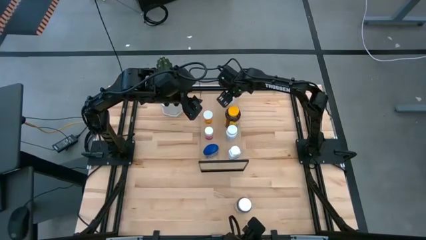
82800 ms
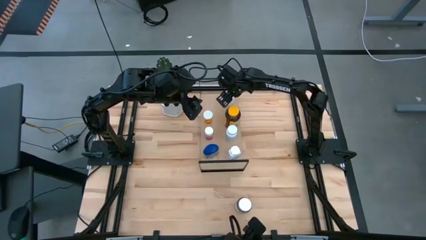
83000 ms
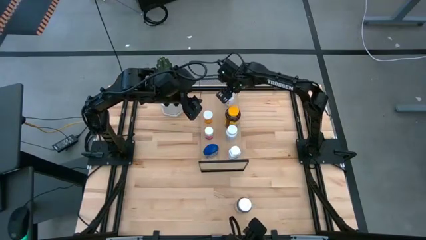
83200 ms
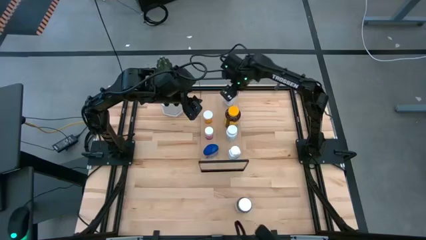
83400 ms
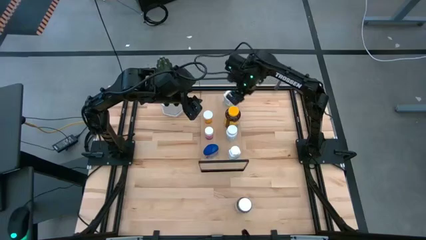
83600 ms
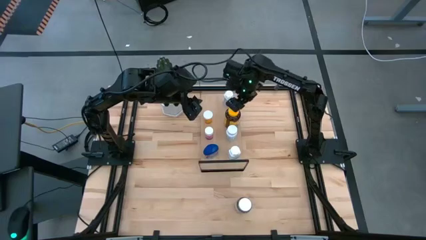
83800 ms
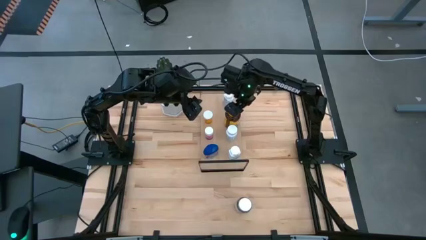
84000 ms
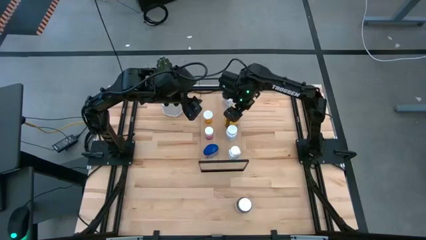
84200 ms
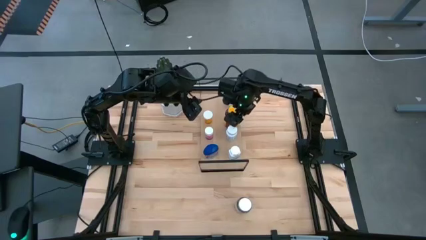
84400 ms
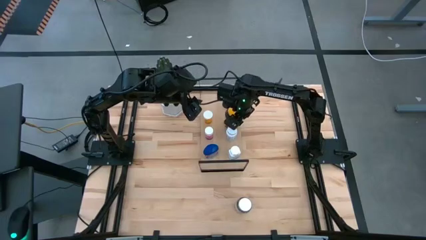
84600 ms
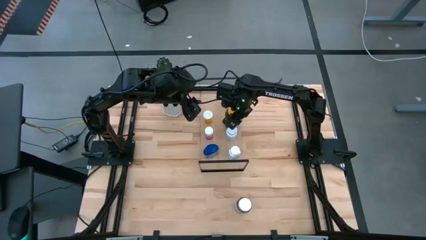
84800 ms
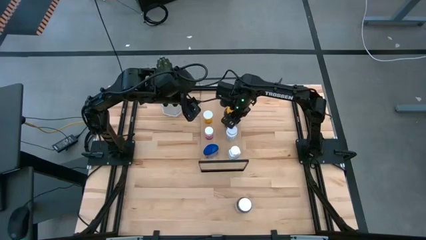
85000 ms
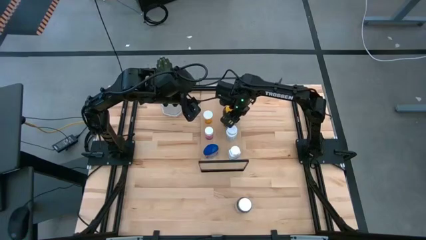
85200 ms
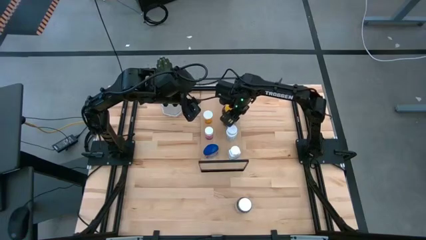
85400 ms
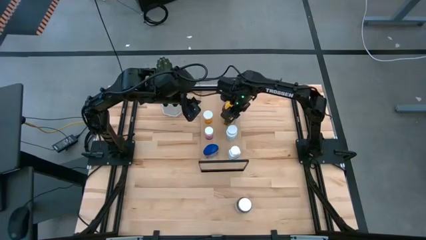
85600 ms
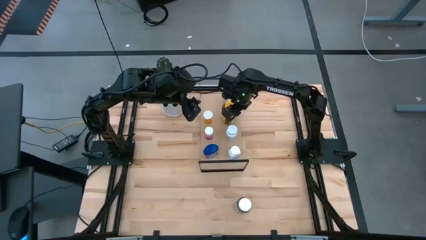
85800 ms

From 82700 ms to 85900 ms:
Task: Pick and place medicine bottles onto shelf by color
Adjust the large orange medicine bottle on the shelf

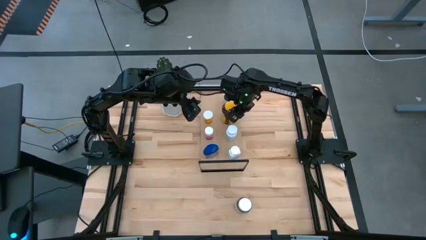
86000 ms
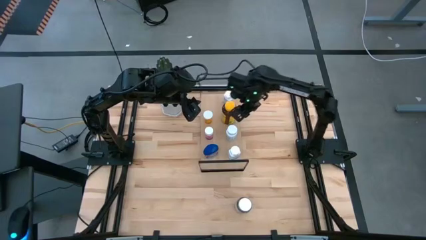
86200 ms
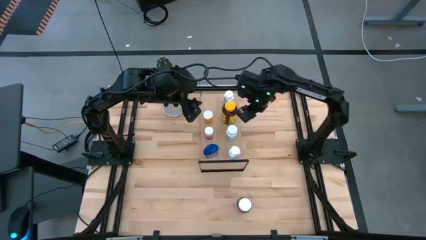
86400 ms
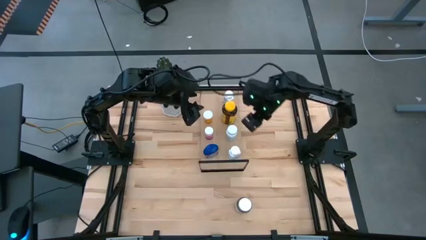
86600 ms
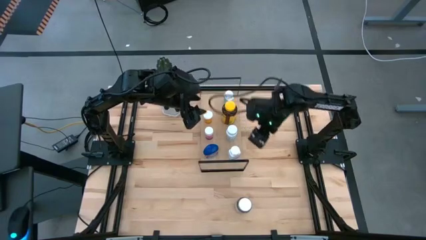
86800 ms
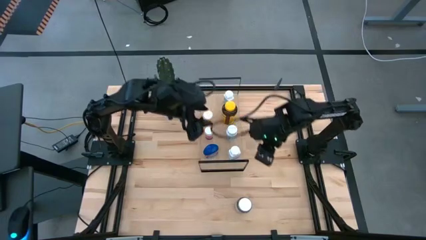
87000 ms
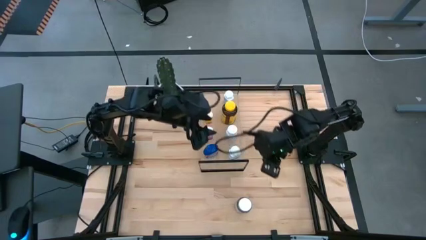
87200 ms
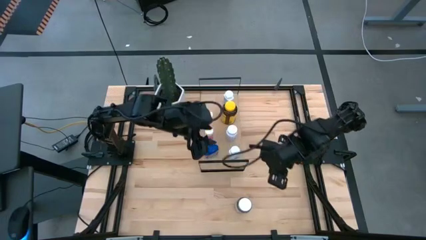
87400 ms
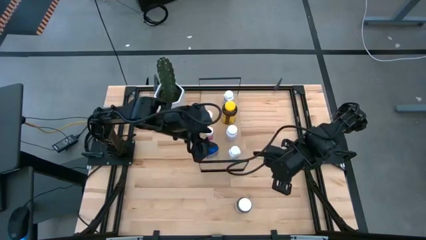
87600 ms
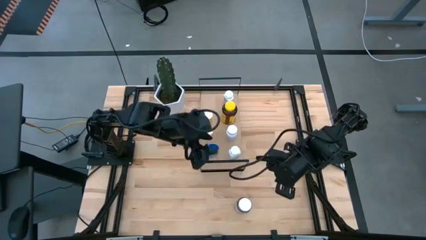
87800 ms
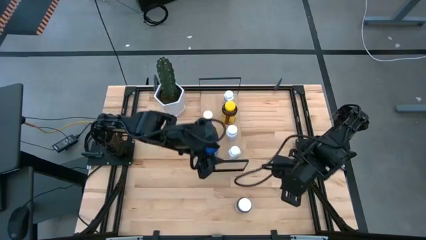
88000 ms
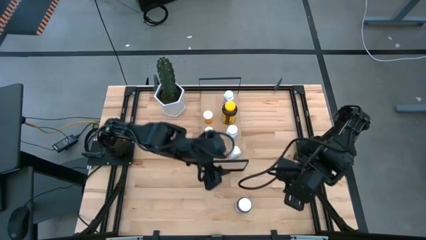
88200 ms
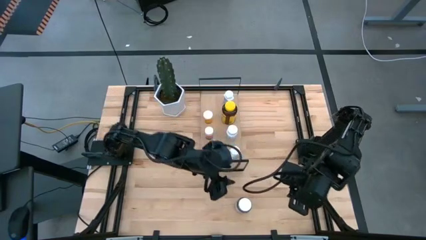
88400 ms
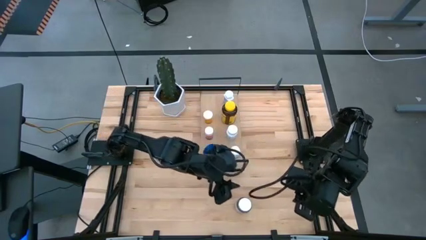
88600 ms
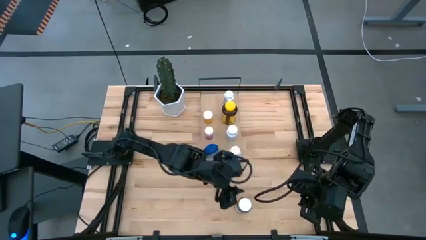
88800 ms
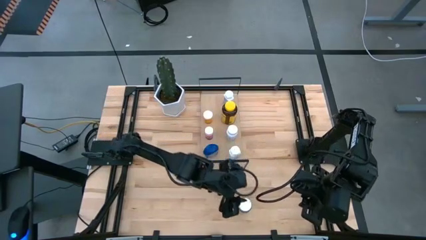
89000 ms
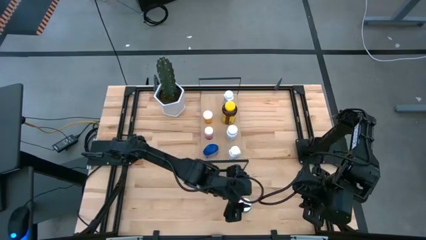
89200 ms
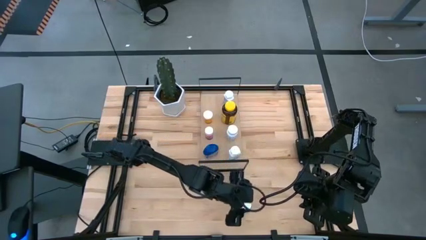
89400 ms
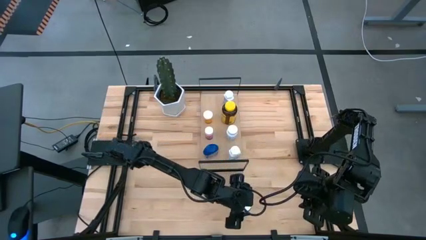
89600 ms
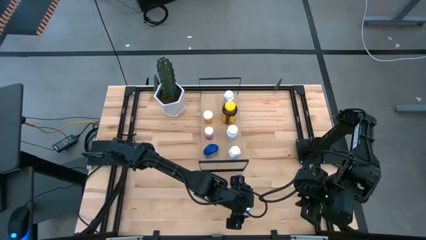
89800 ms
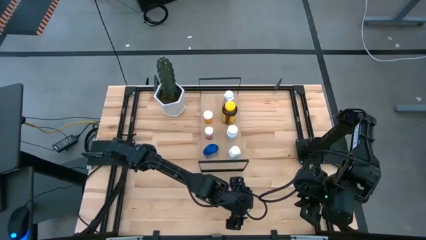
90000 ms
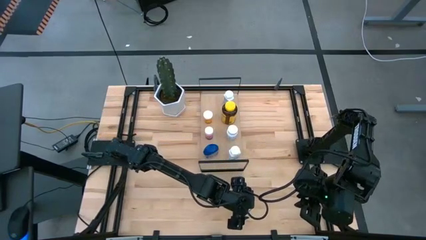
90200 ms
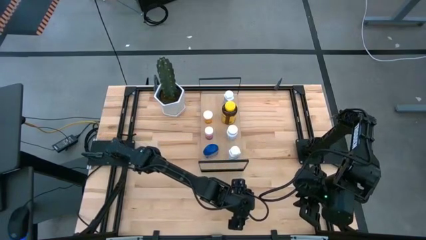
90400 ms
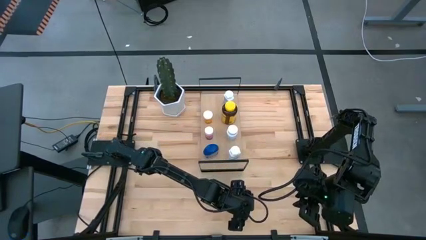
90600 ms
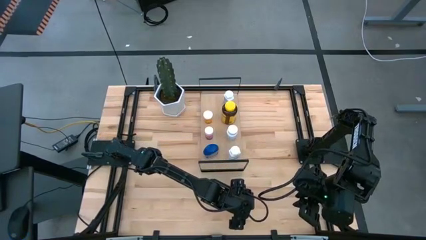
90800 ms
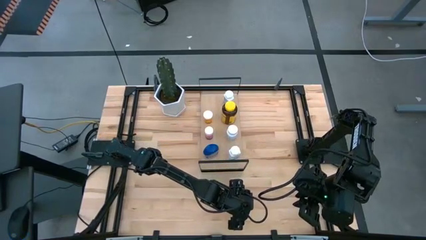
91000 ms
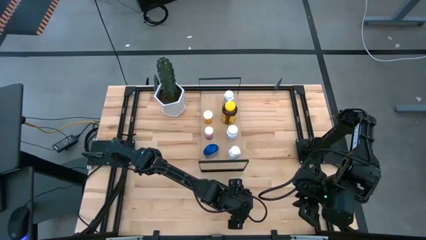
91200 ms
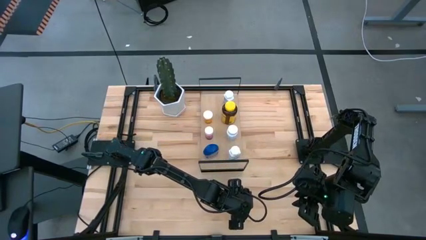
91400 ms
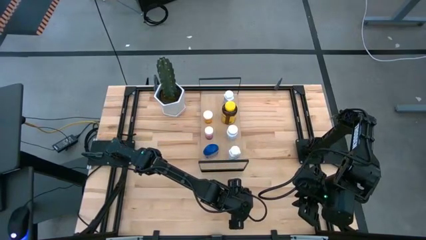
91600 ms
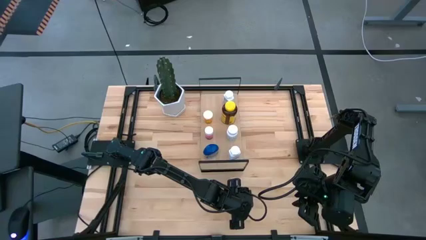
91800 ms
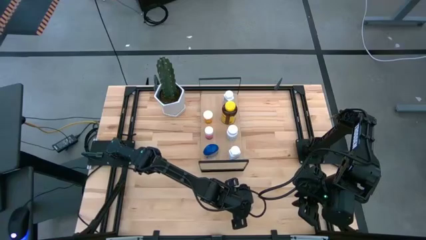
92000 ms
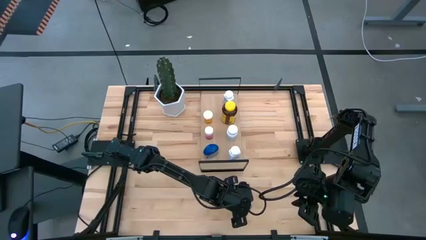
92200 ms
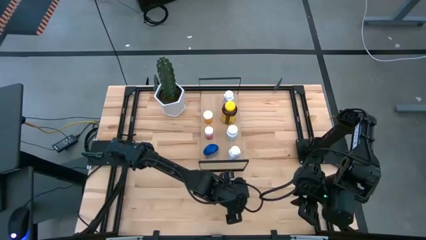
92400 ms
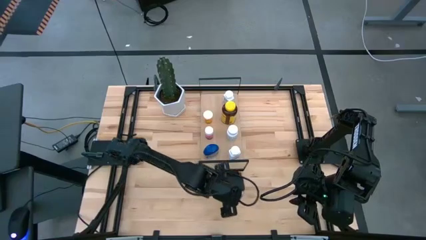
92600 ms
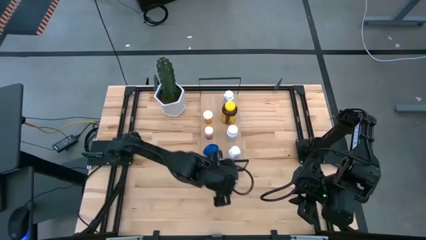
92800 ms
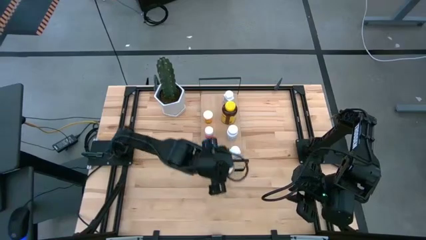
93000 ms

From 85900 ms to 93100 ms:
Put the green medicine bottle on the shelf

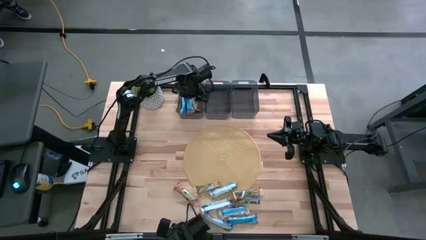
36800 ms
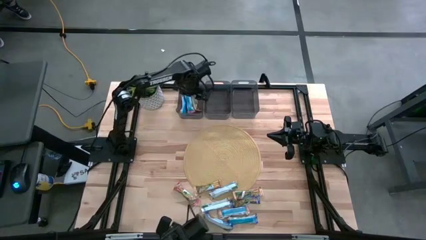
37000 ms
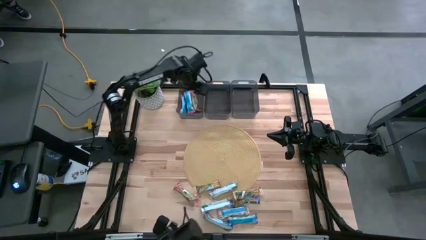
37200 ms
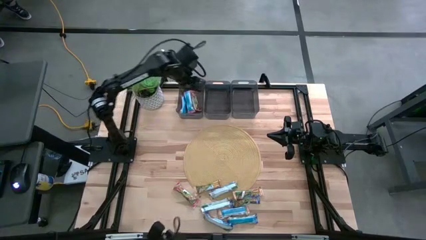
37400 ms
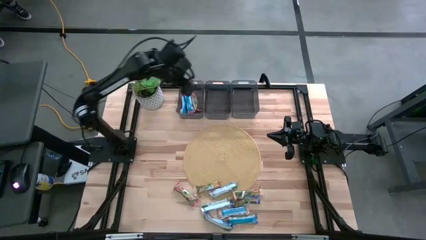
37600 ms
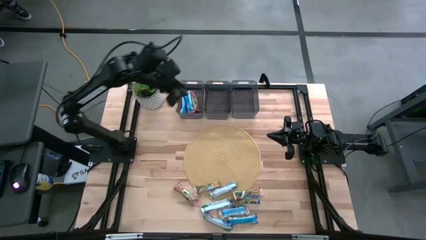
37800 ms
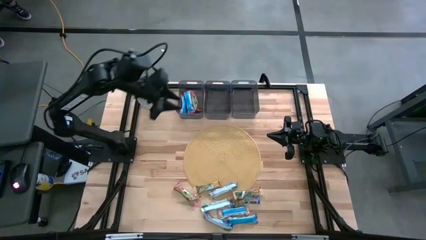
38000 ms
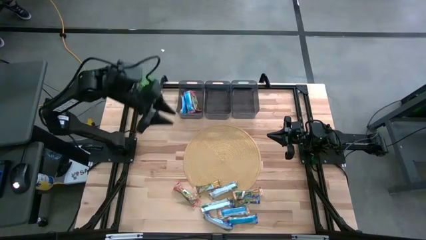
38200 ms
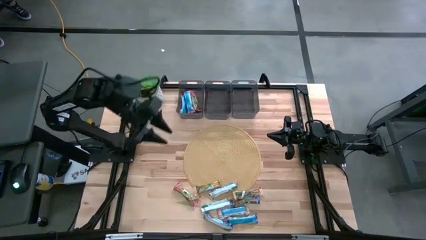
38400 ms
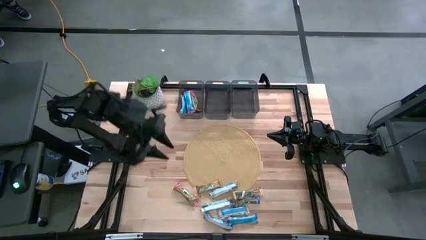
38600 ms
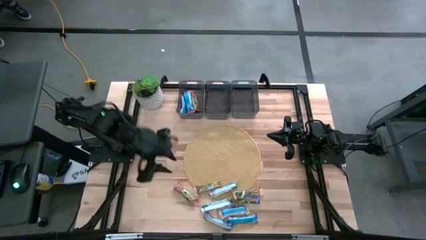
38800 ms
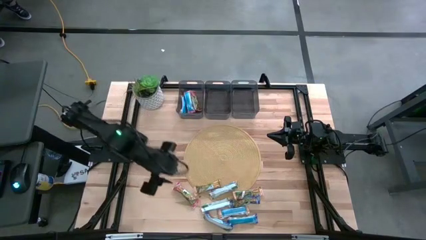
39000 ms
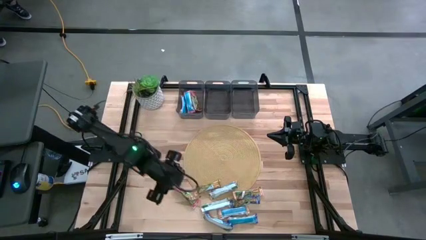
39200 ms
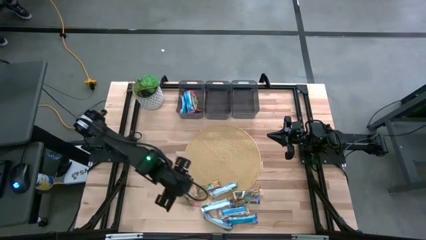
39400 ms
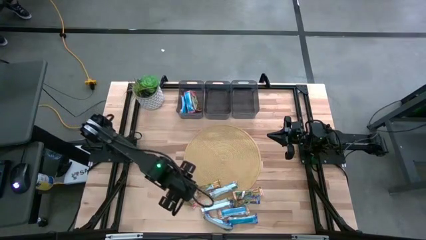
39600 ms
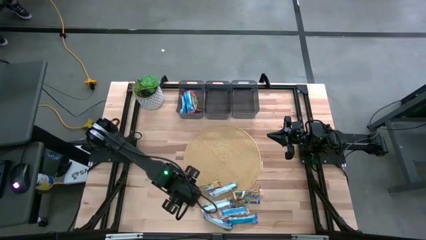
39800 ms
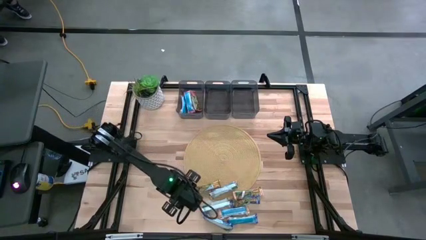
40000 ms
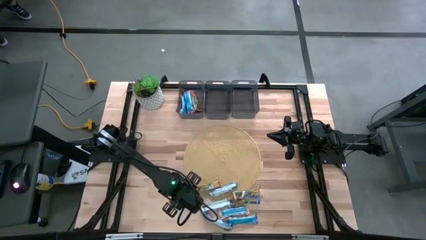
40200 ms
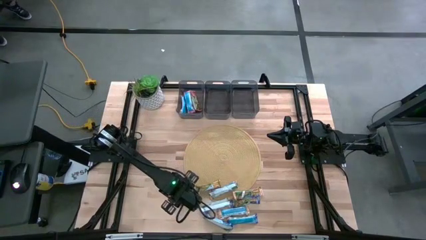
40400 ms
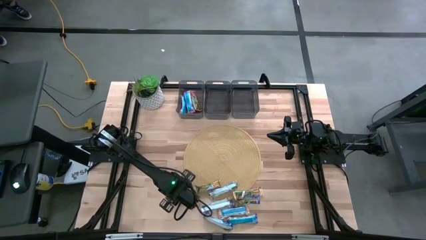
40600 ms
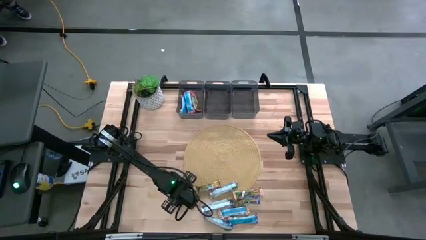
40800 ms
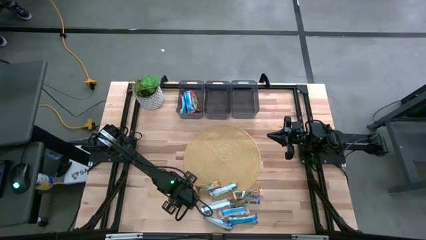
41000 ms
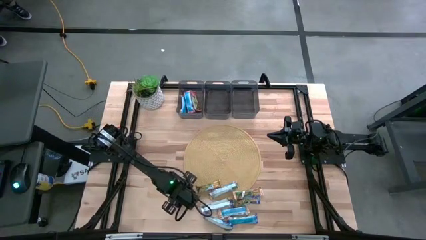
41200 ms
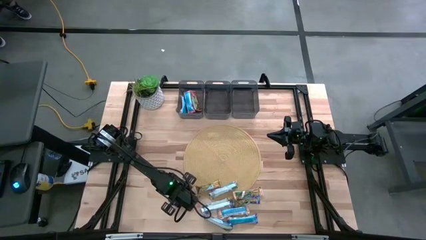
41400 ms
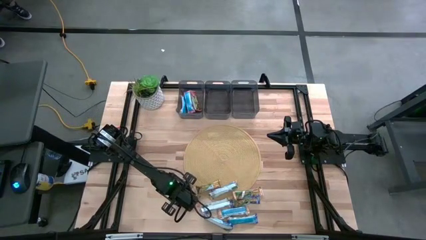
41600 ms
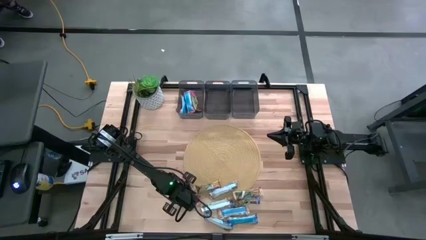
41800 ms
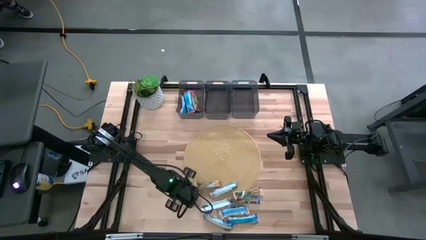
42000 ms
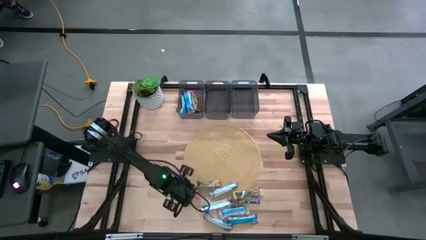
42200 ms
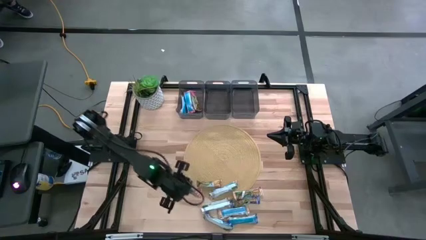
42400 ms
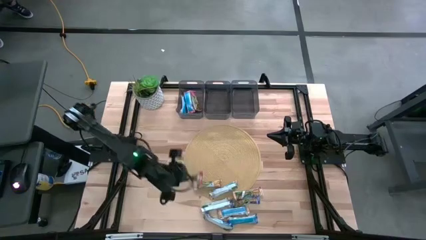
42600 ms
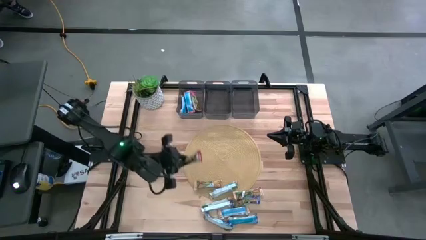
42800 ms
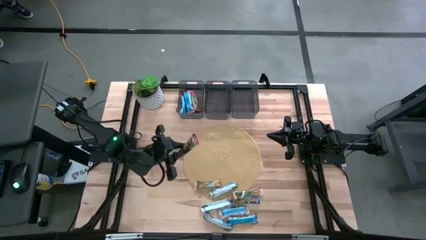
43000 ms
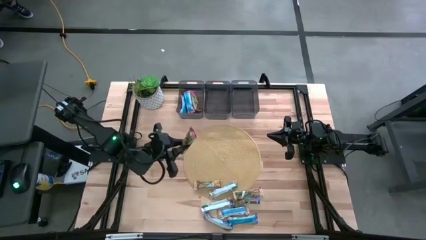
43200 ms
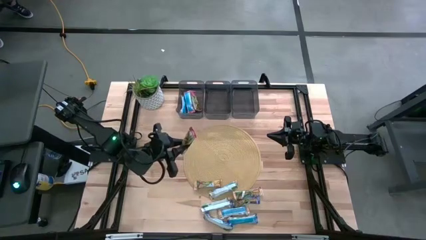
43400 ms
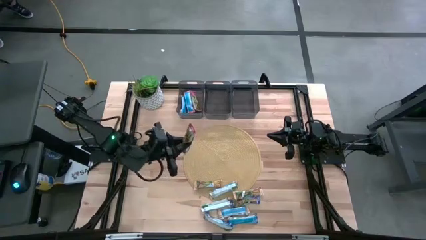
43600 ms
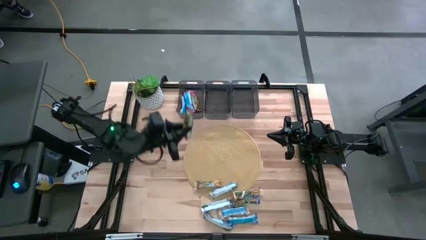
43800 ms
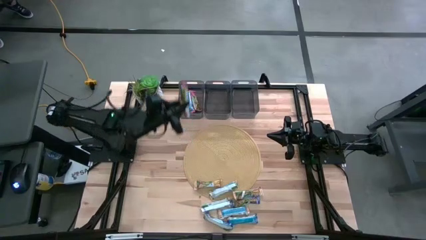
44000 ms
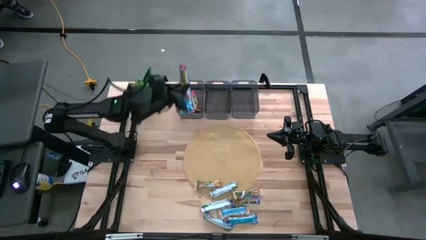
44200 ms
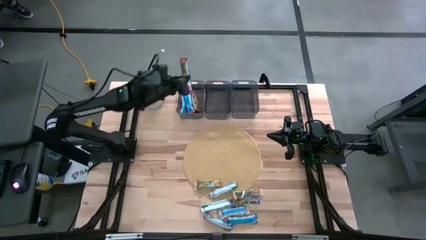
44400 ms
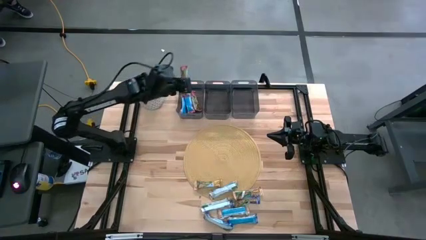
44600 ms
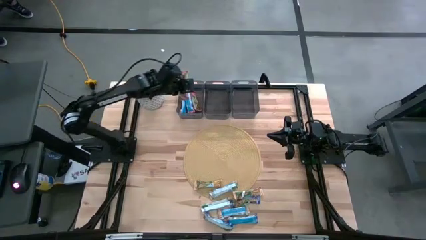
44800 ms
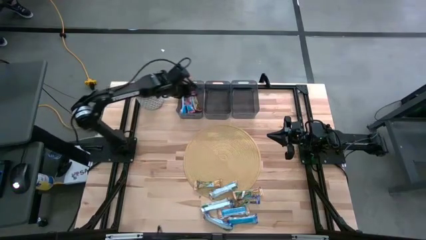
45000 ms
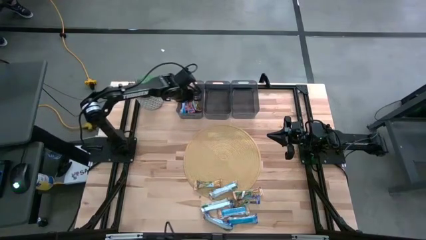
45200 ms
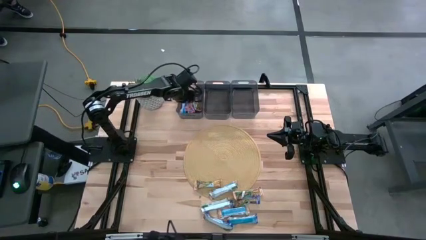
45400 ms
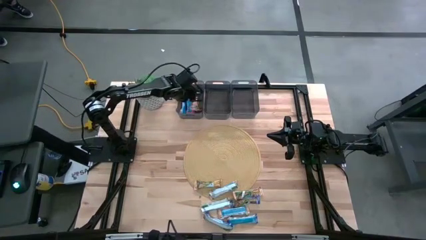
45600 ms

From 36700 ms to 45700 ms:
Task: Pick and place Granola Bars by type
Put the red granola bar into the left black bin
